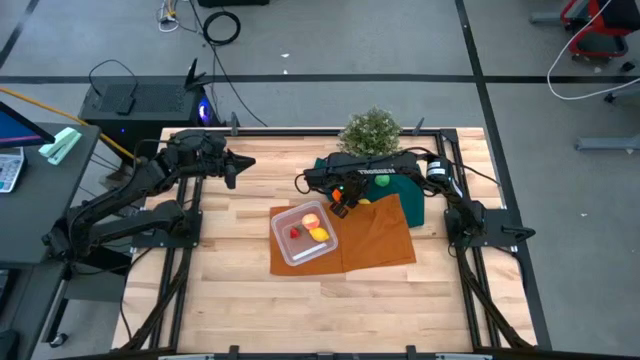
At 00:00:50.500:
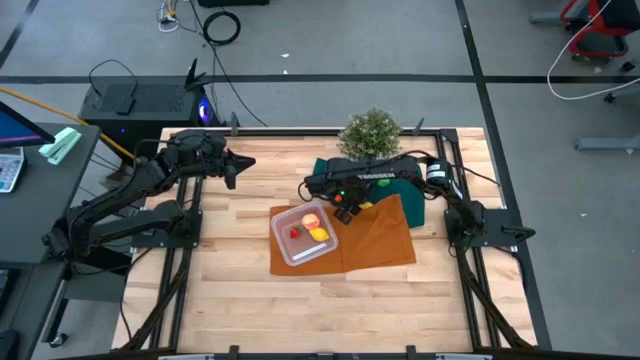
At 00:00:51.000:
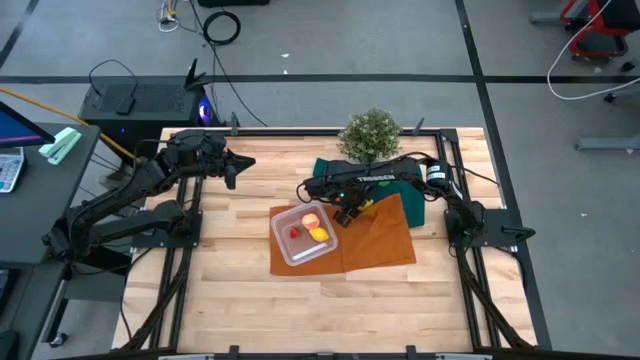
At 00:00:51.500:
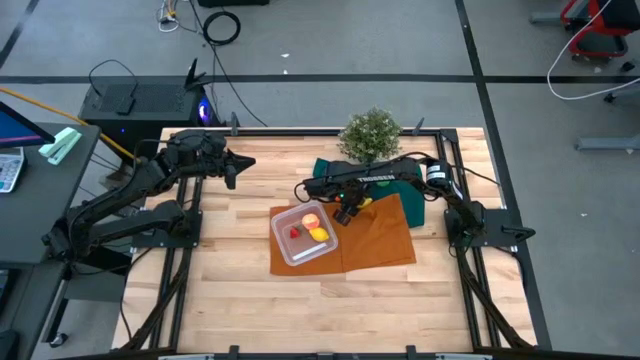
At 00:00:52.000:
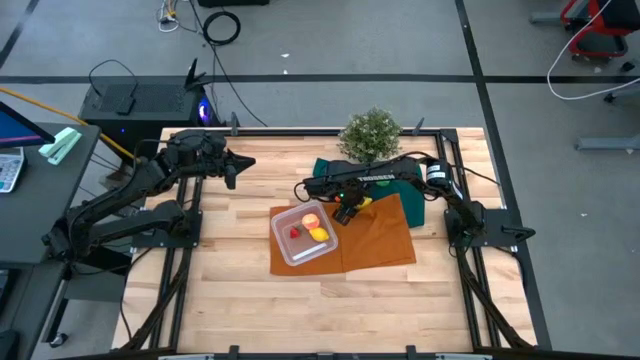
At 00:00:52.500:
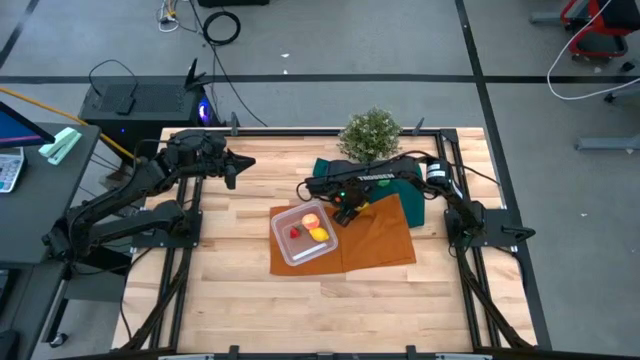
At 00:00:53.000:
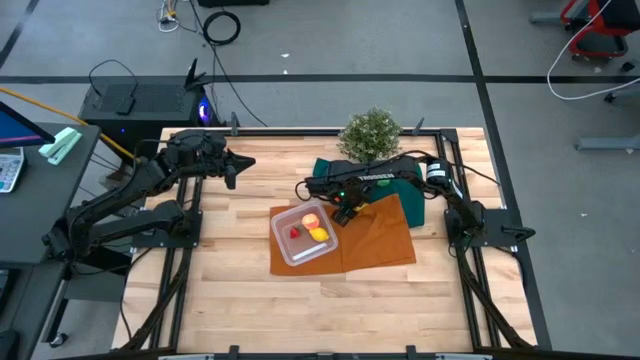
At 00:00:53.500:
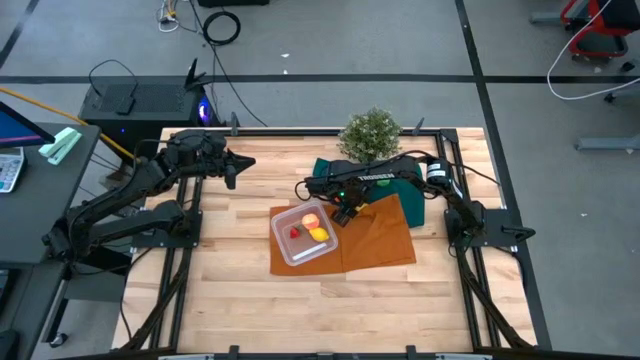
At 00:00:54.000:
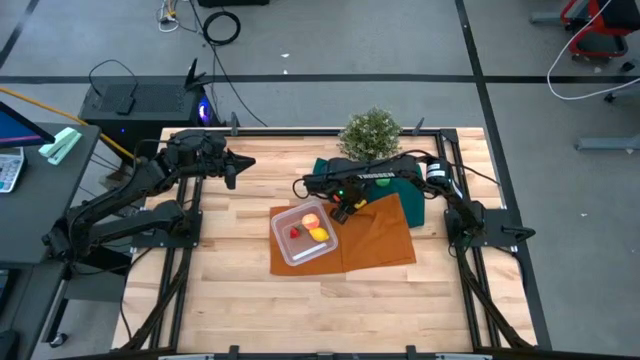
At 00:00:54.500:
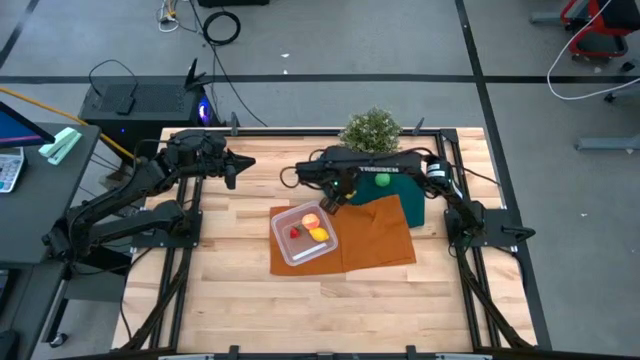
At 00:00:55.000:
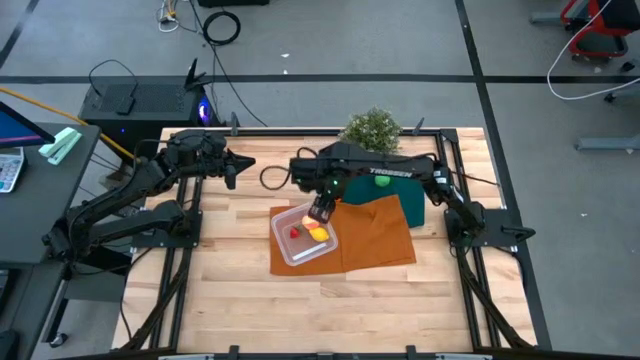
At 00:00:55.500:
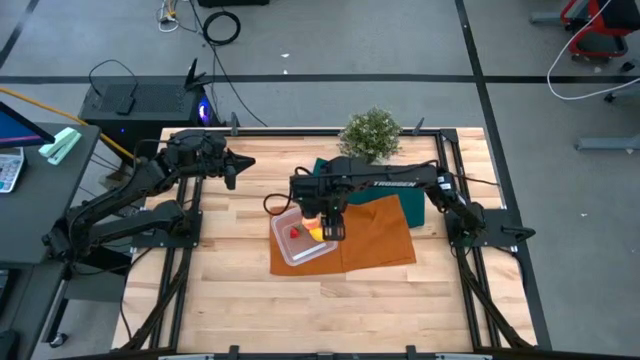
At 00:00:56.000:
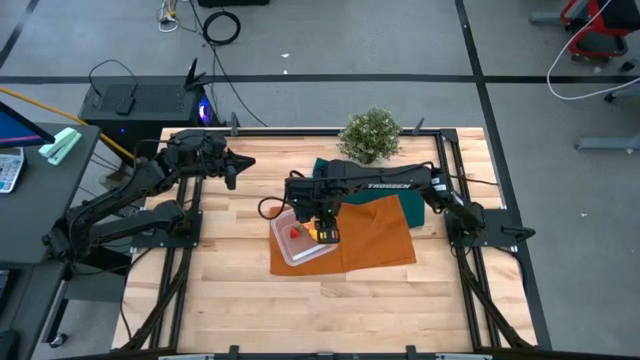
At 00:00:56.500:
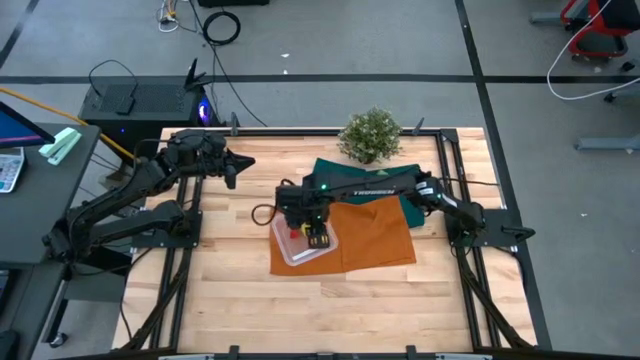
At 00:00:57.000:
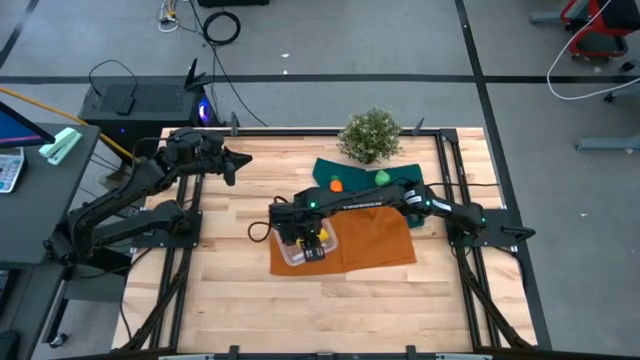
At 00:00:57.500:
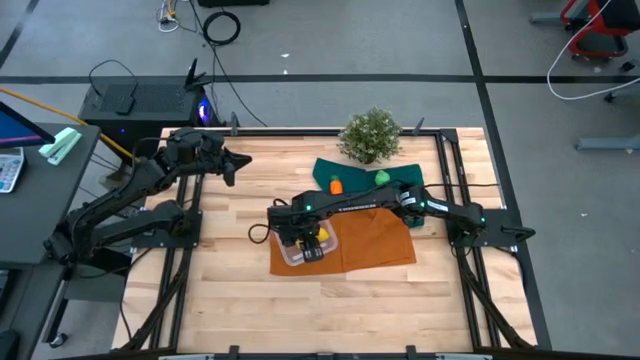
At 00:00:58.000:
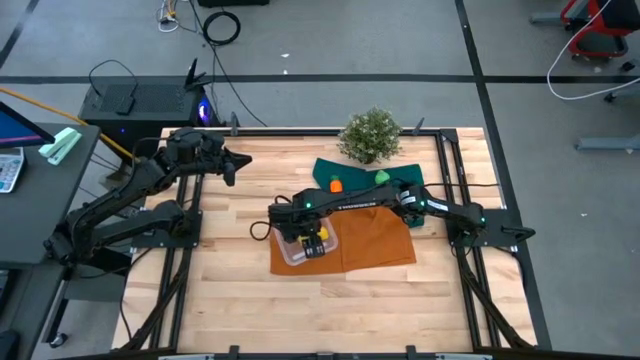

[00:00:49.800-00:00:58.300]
Task: Pick and placing Produce into tupperware
Put the yellow lemon into the transparent bin

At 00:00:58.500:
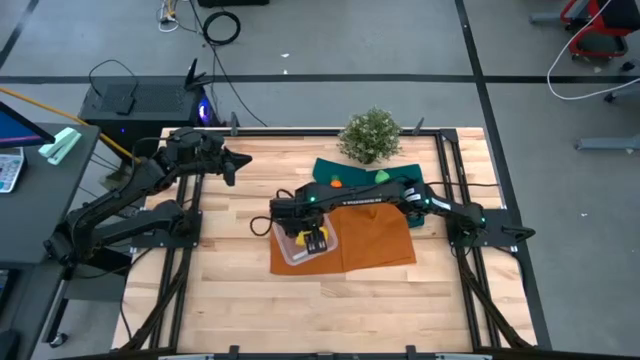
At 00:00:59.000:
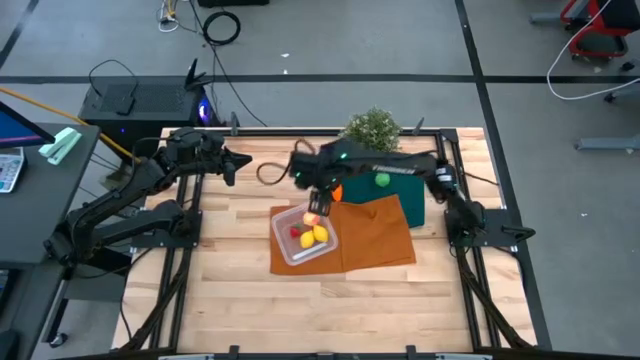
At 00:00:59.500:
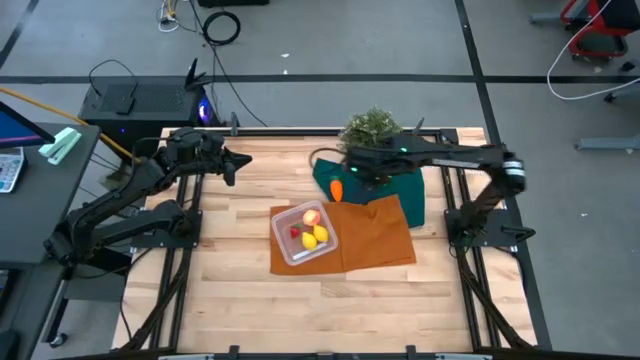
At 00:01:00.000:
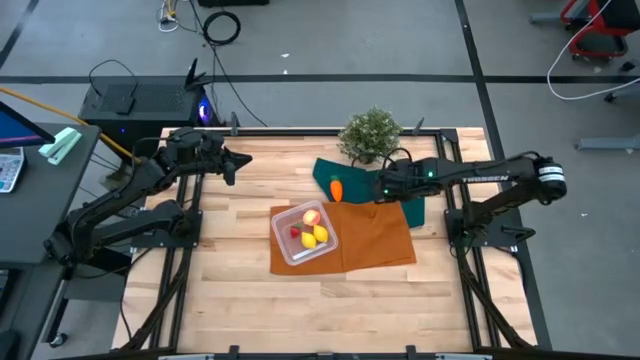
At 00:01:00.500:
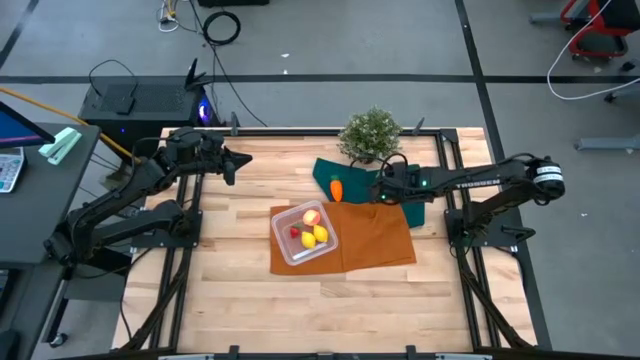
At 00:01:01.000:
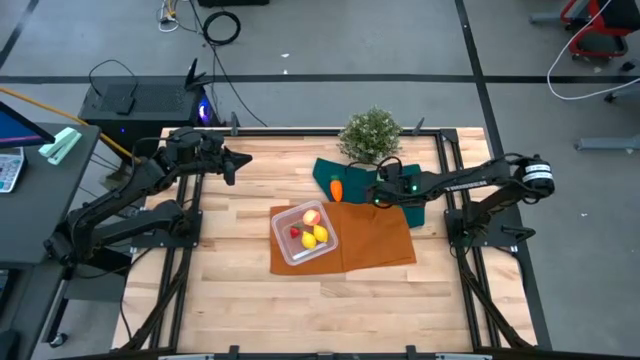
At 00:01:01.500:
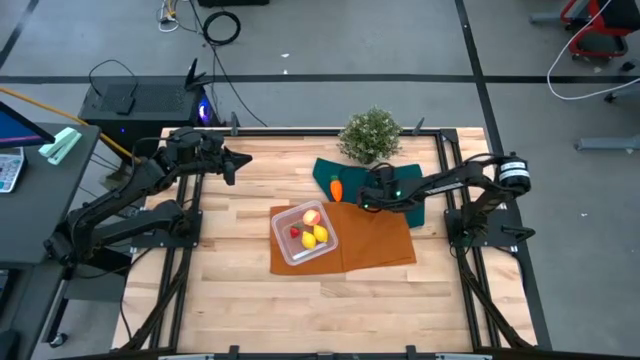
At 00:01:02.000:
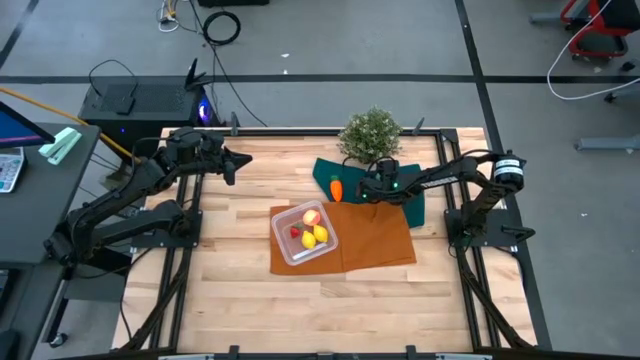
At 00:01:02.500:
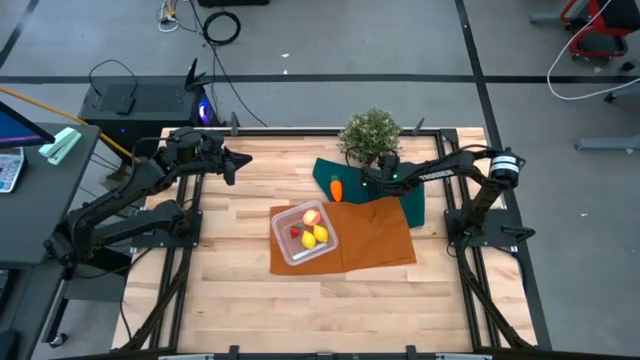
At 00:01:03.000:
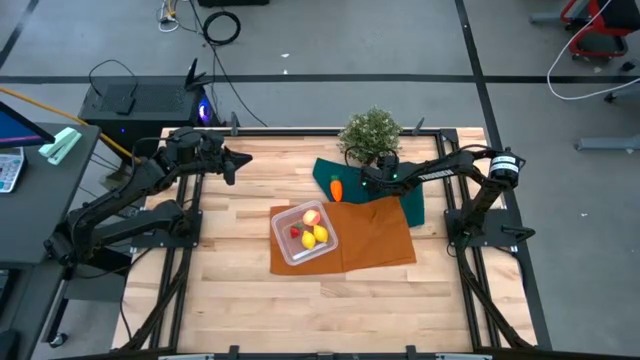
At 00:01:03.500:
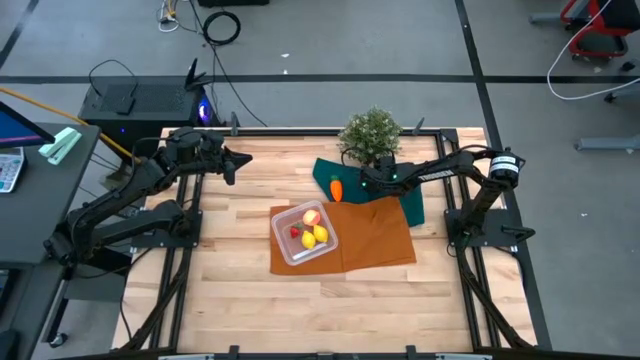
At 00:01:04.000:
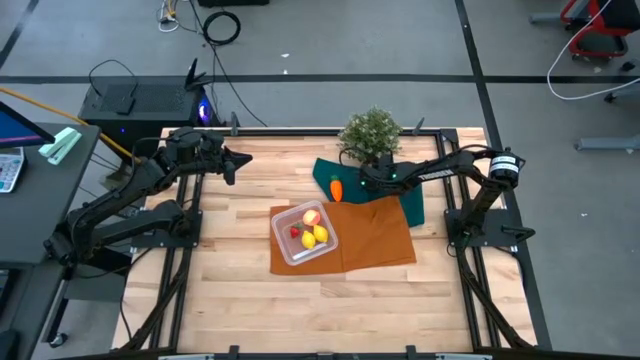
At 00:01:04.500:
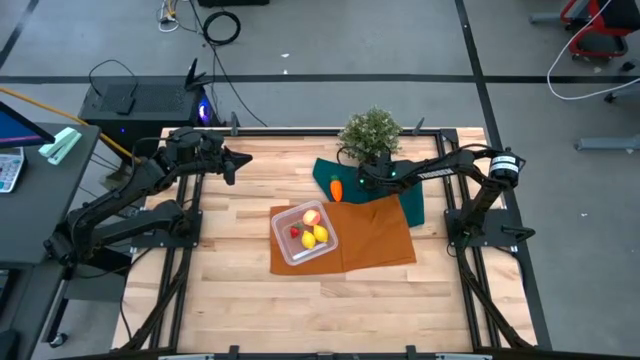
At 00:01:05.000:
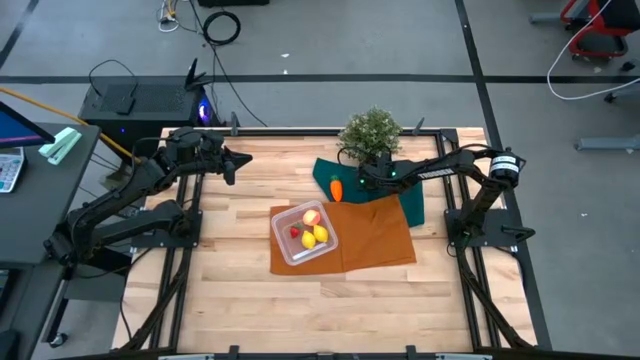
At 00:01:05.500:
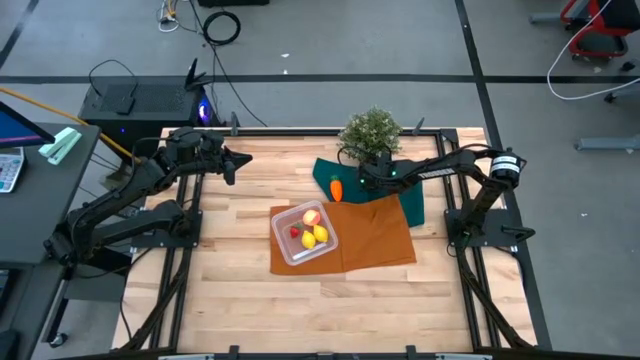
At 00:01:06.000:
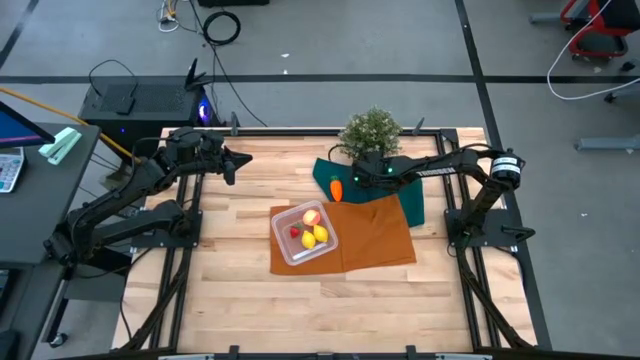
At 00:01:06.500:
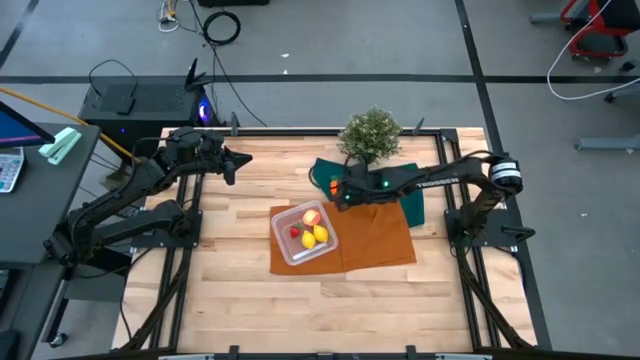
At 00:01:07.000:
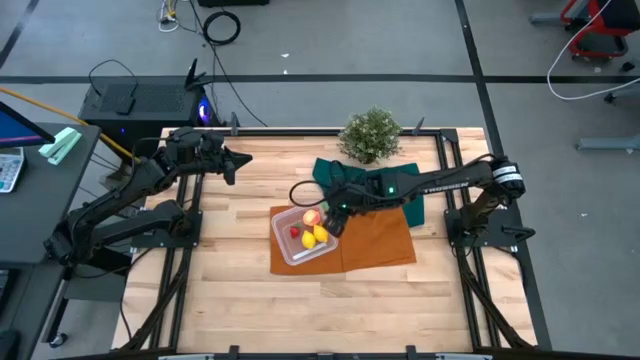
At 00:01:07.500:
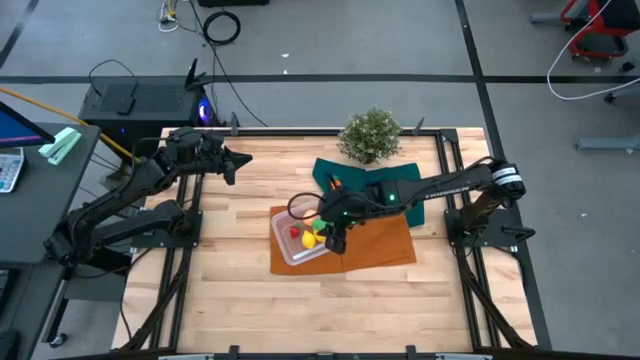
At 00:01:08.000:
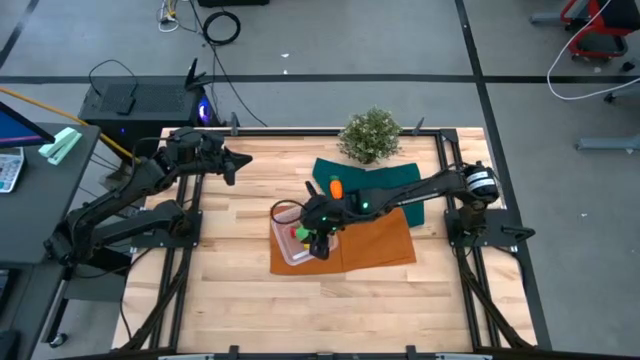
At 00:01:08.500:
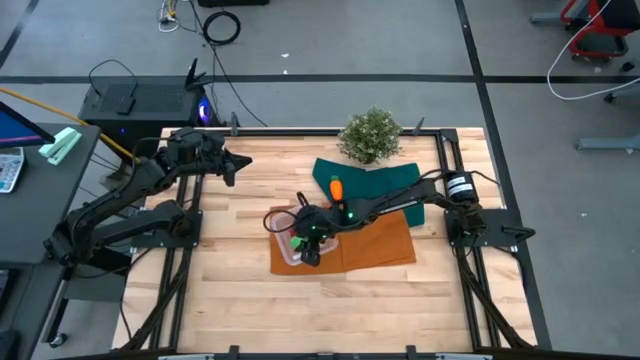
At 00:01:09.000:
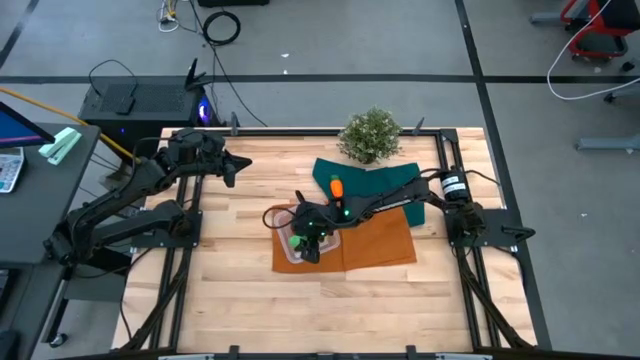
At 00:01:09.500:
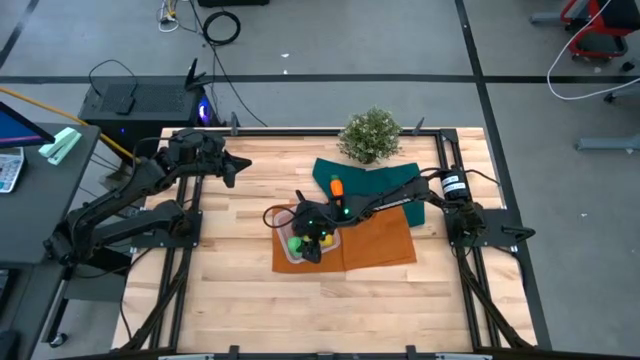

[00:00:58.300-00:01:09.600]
Put the green pear into the transparent bin

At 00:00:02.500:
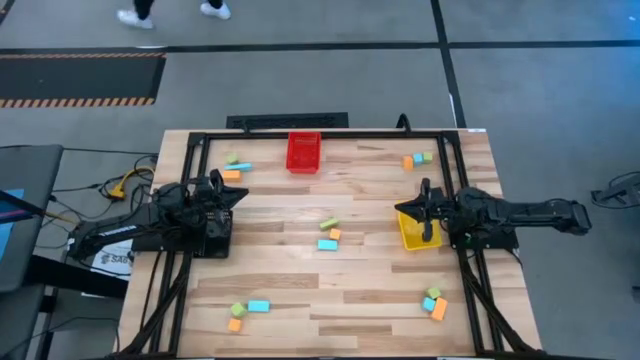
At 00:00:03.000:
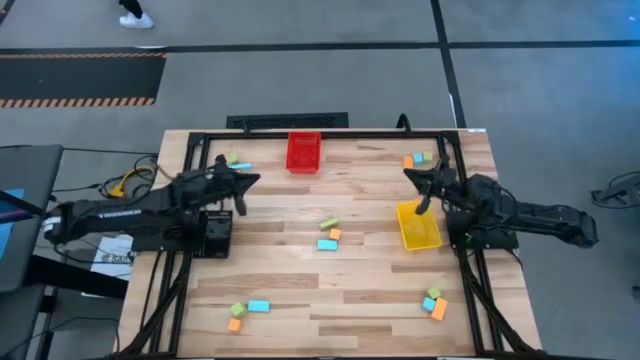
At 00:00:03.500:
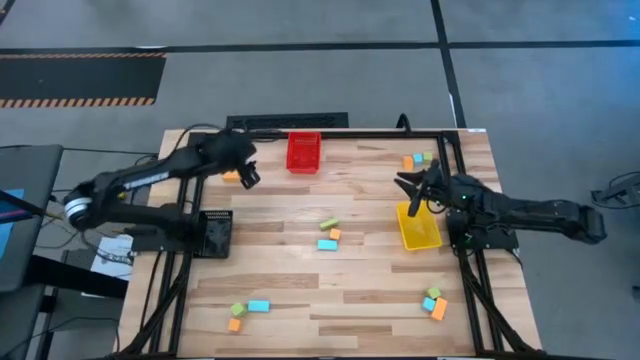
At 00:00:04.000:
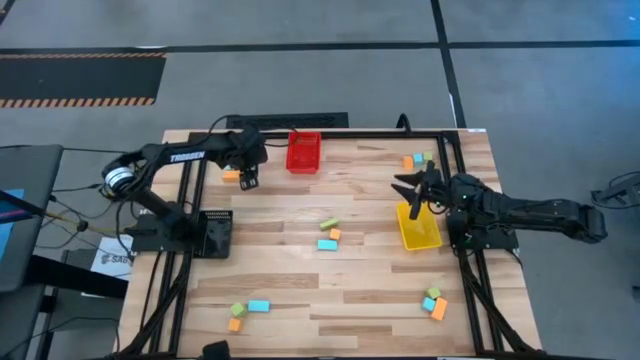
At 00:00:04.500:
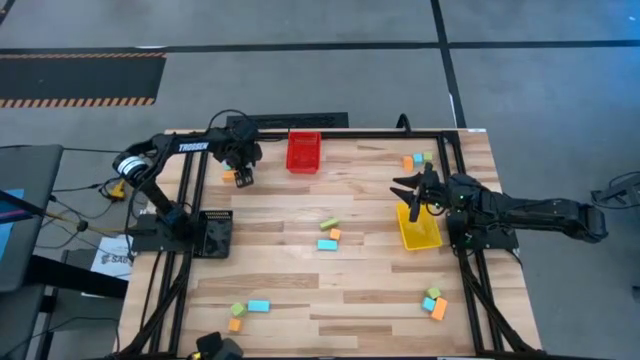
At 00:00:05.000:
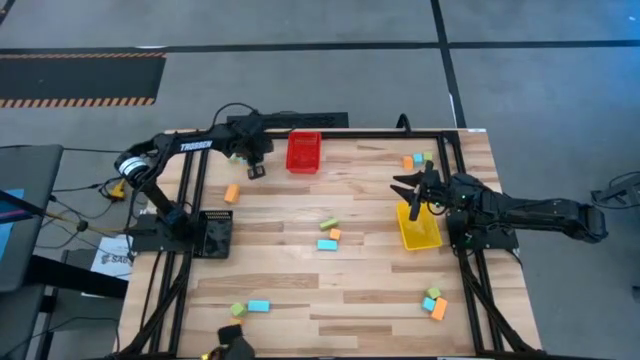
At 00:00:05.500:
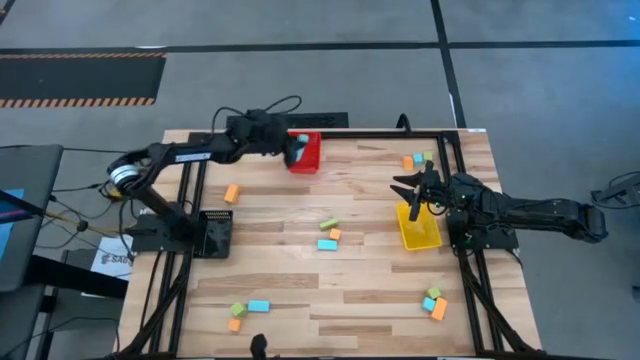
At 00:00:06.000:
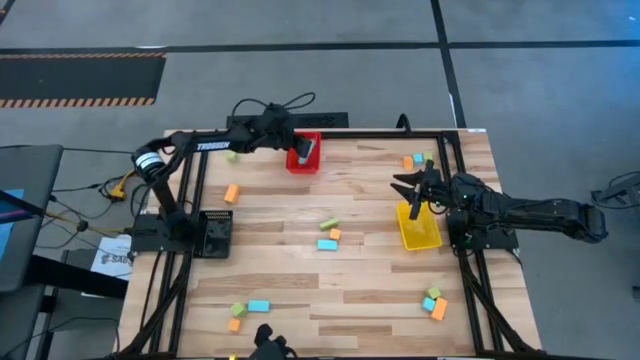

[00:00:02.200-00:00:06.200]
Task: Sort & place blocks by color
Put the light blue block into the red bin
